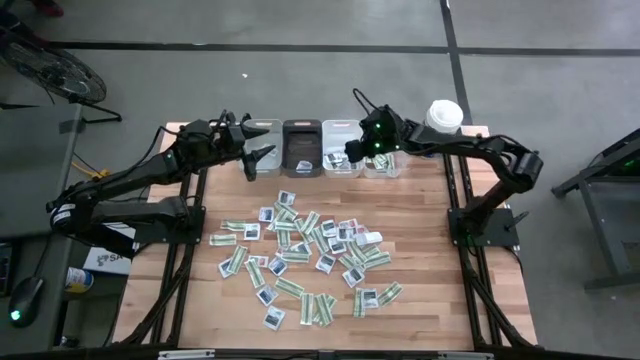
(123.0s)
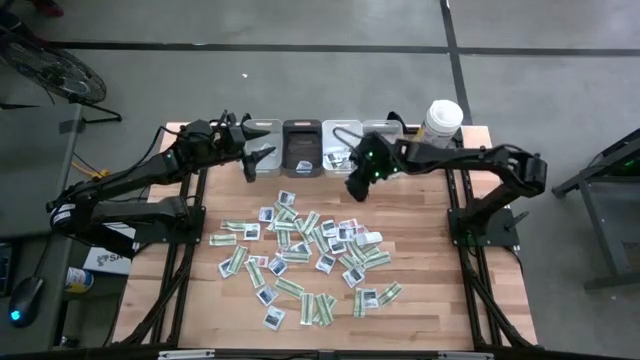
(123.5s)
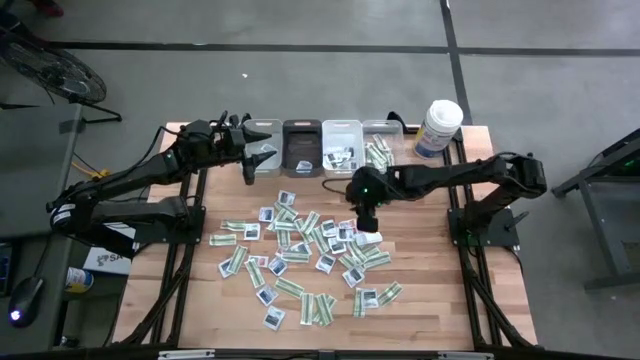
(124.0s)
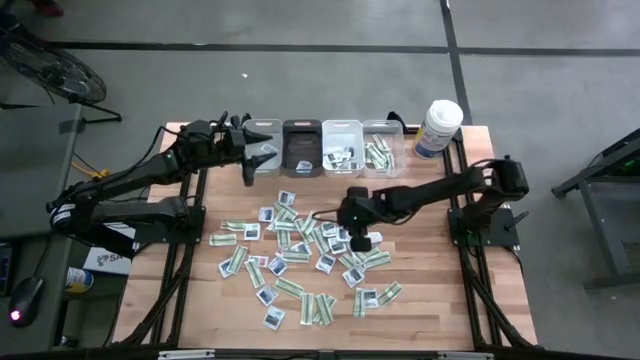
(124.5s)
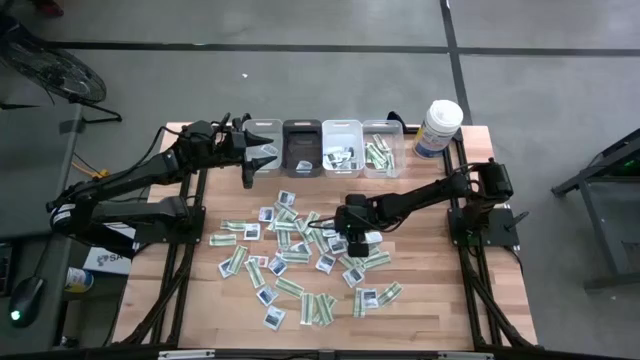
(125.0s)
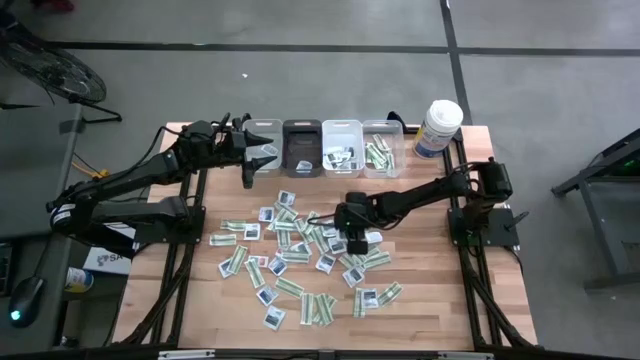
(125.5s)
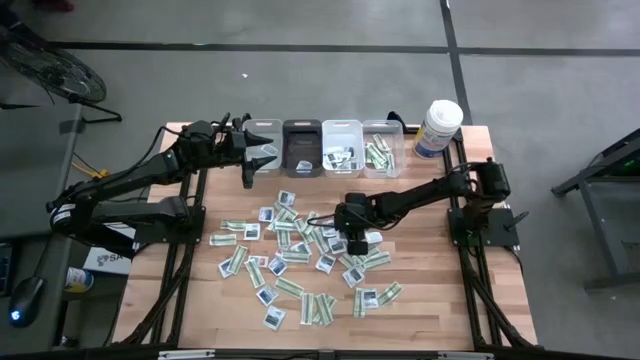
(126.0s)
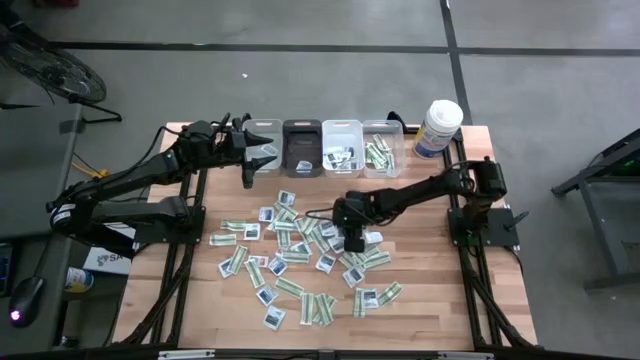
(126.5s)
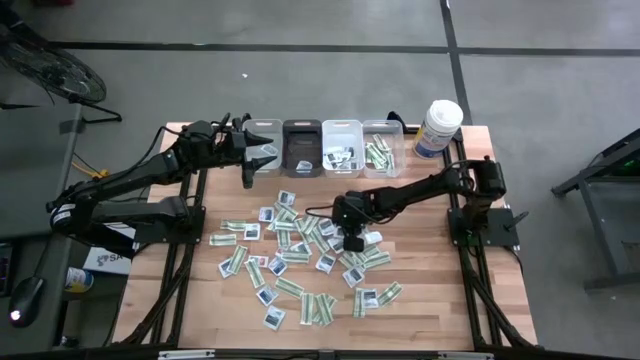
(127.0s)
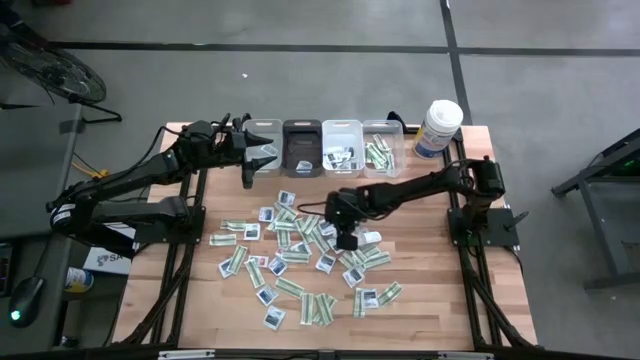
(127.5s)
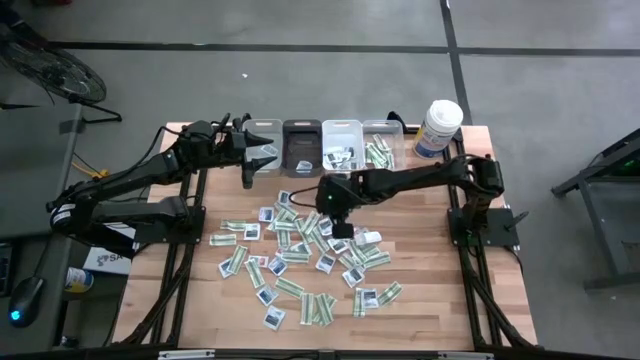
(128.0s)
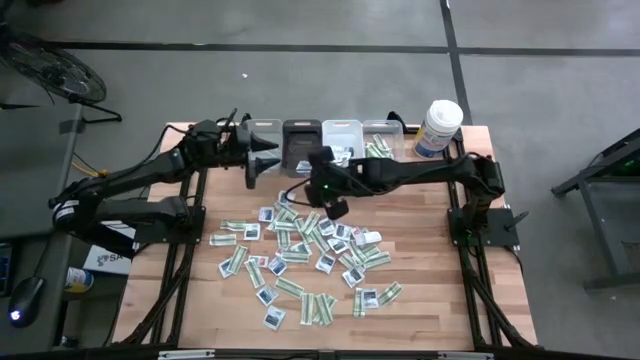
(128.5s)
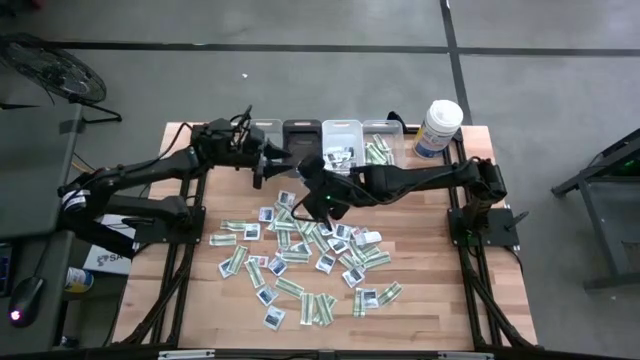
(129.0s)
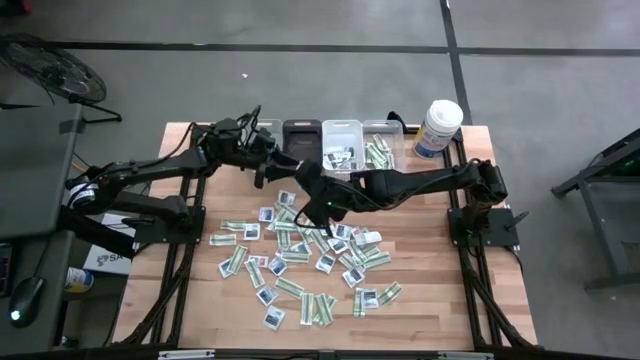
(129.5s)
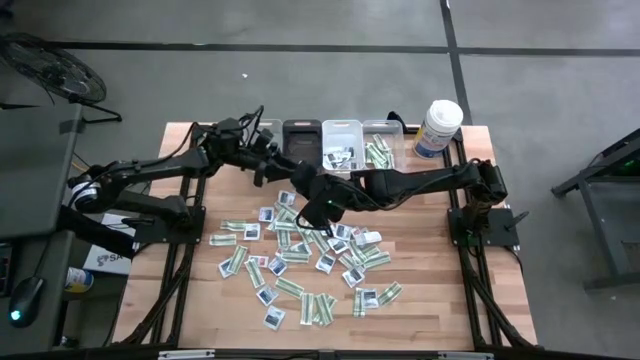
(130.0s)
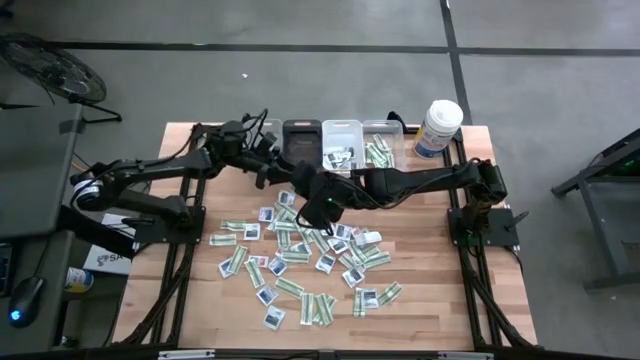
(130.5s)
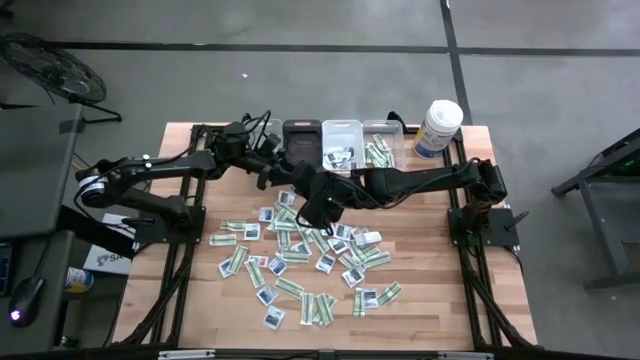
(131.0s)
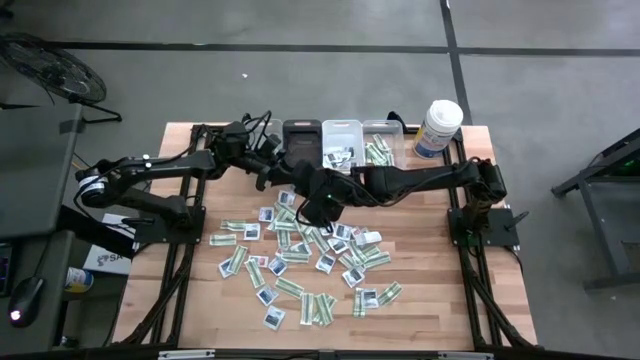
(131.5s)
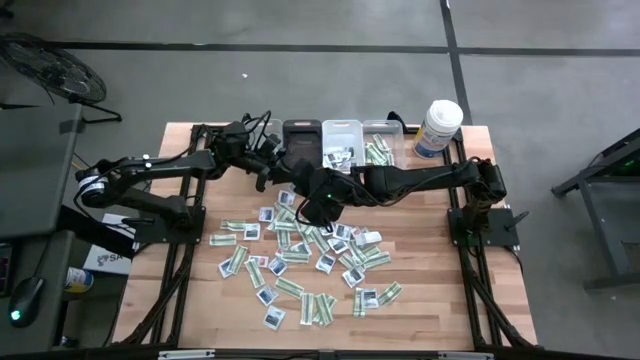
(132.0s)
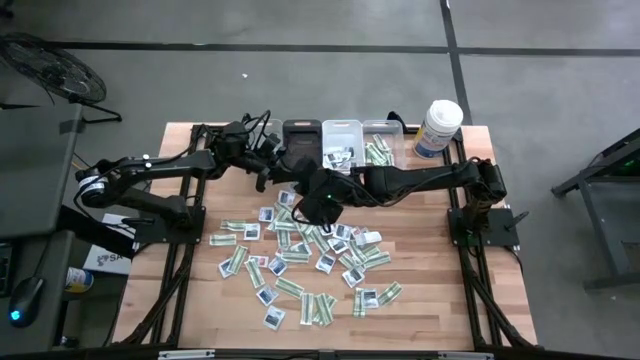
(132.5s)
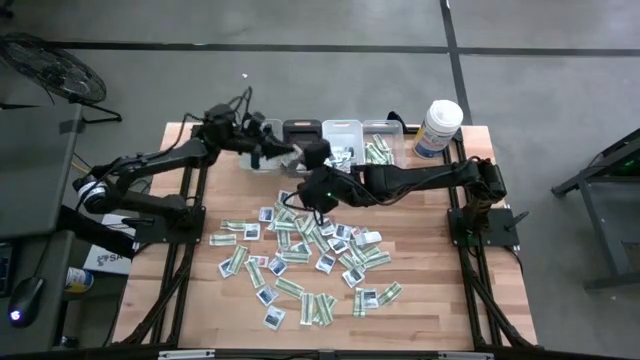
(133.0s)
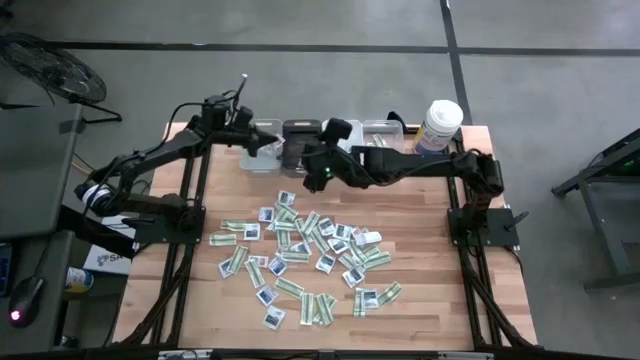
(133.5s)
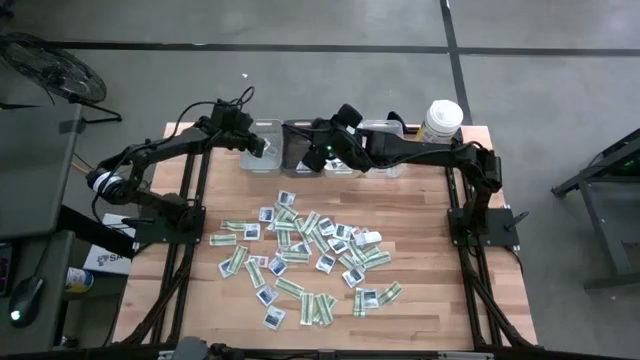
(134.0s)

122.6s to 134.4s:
Task: Pick & Place First Aid Supplies
Put the orange ointment pack into the gray bin

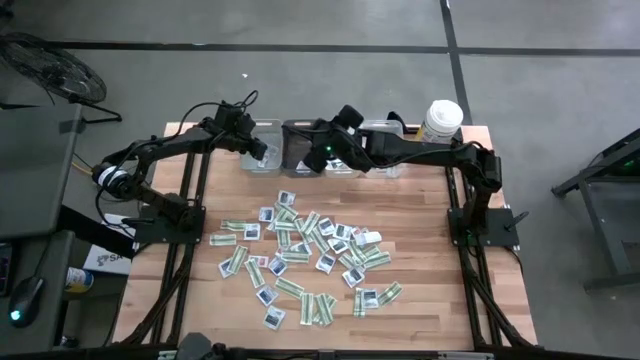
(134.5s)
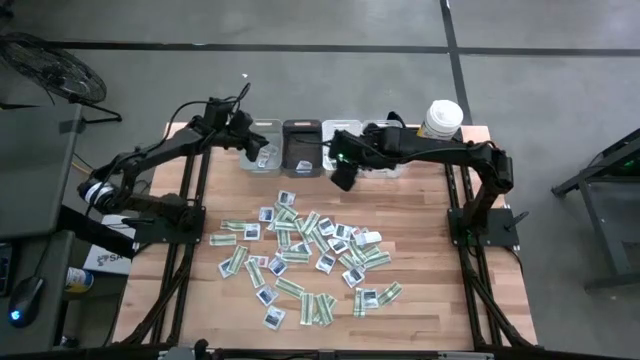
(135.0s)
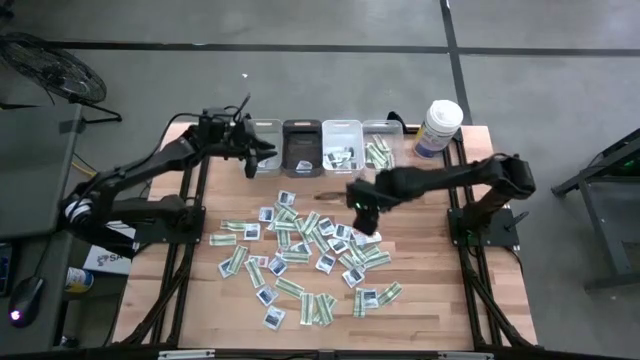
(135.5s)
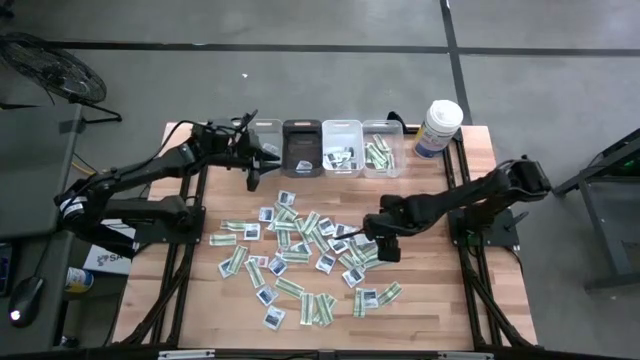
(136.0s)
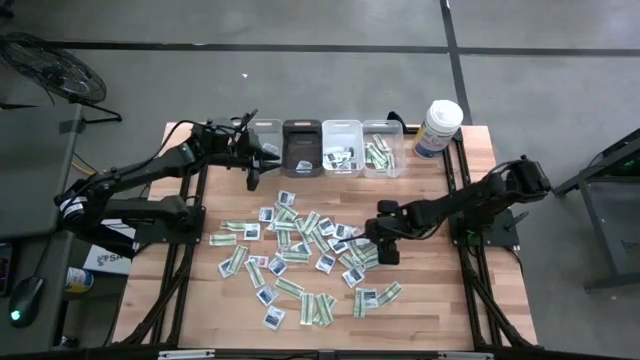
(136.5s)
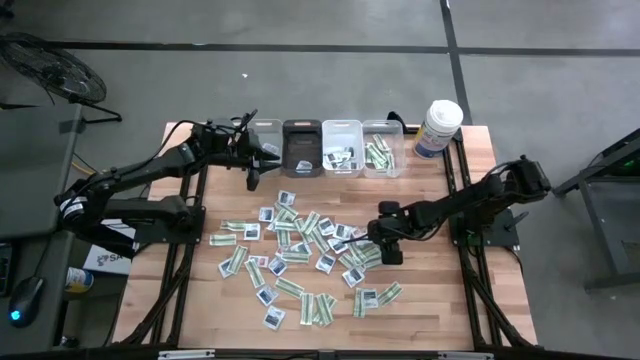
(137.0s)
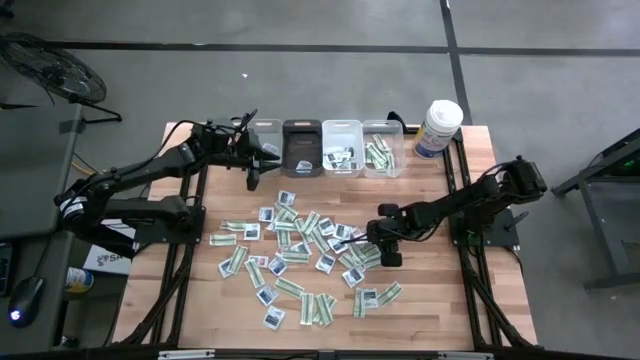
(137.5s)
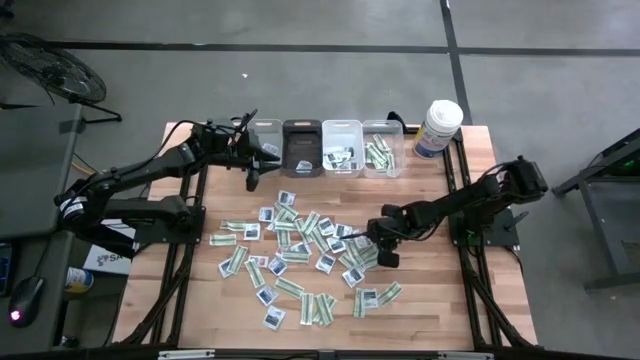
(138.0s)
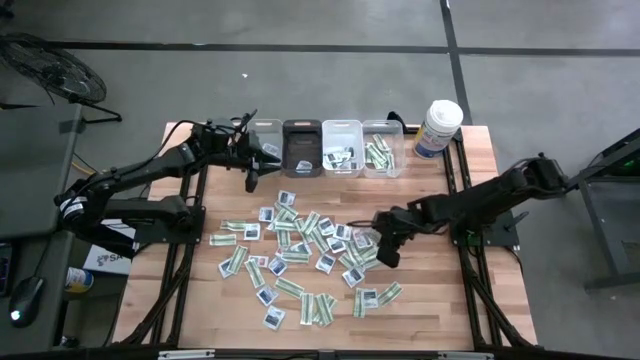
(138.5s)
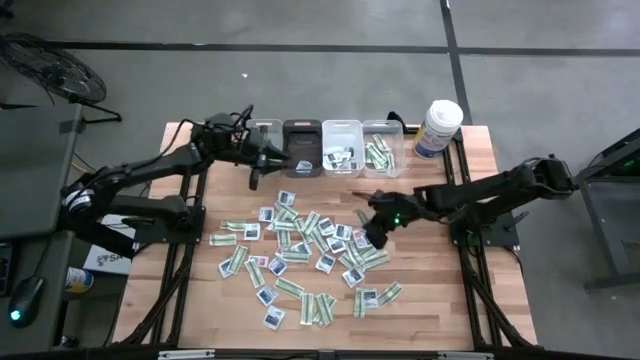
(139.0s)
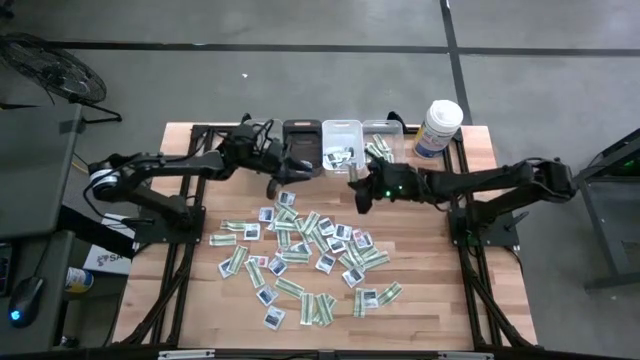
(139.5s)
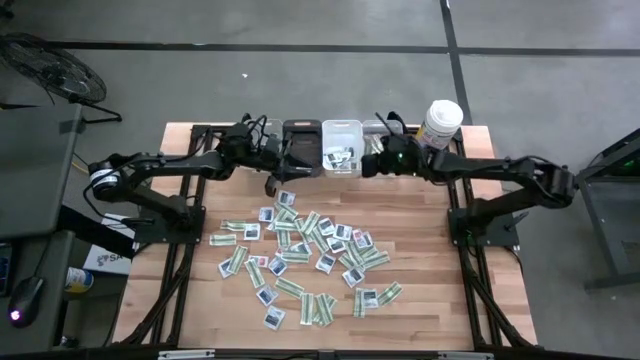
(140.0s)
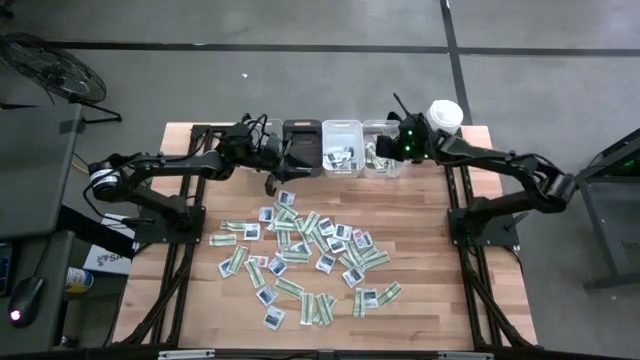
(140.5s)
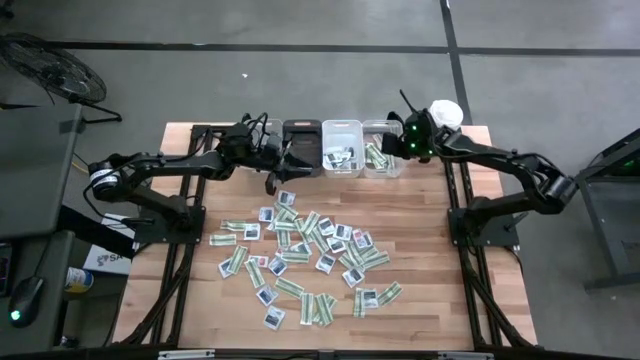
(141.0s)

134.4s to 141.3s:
Put the green bandage into the transparent bin

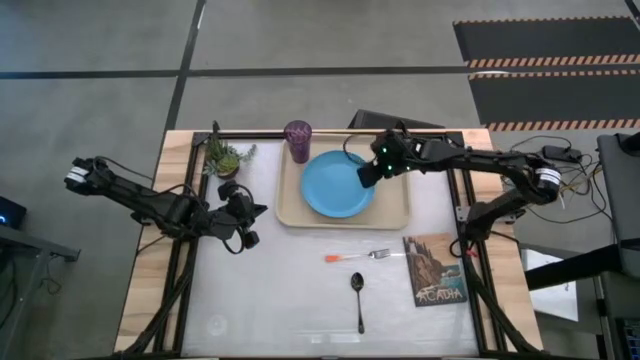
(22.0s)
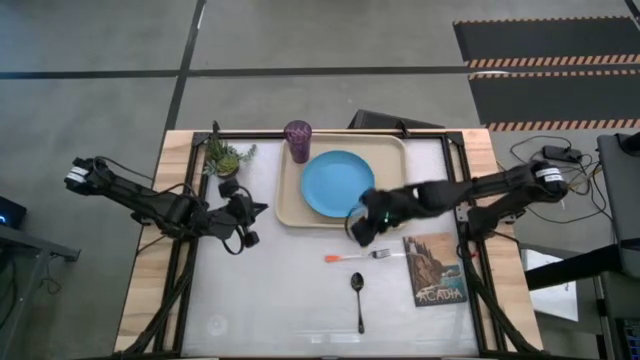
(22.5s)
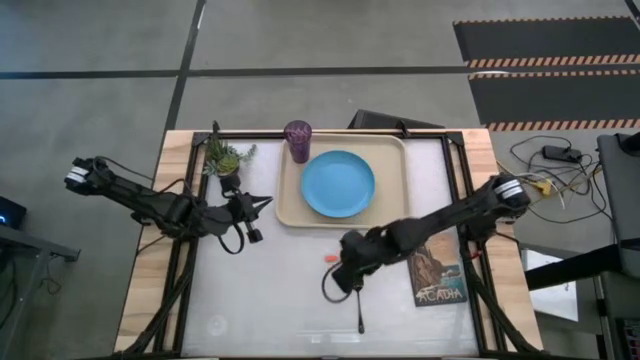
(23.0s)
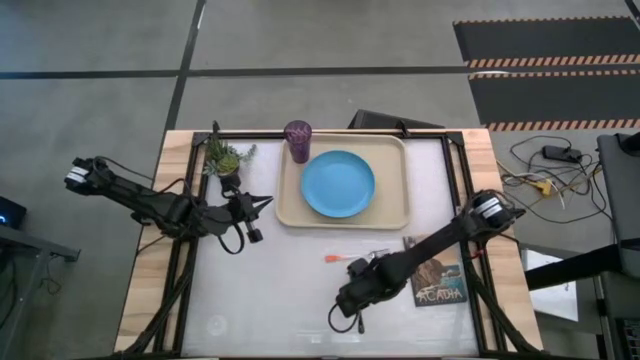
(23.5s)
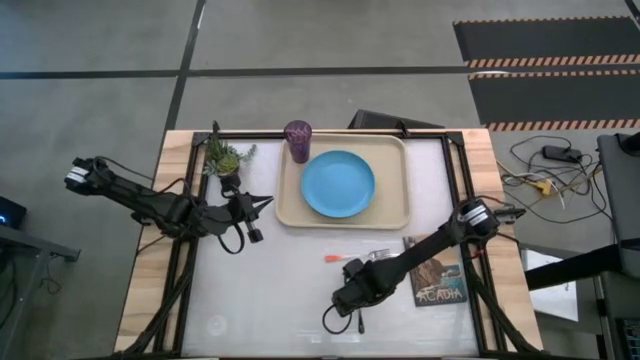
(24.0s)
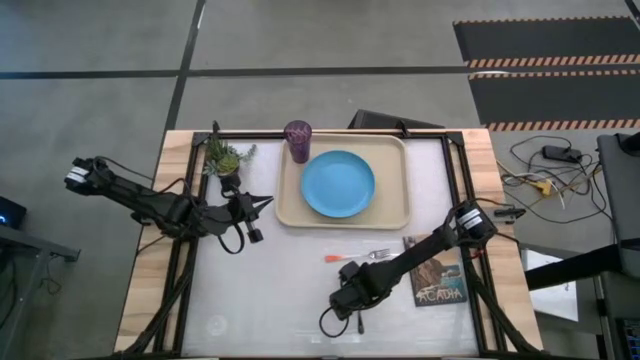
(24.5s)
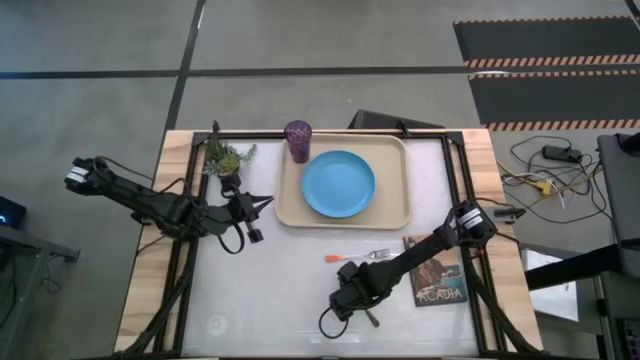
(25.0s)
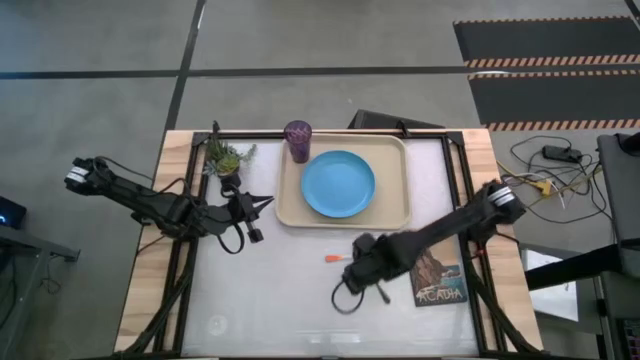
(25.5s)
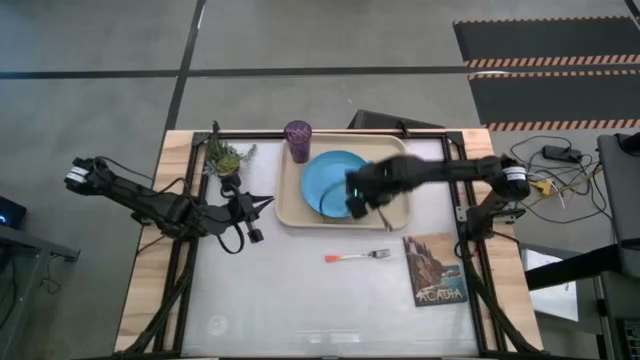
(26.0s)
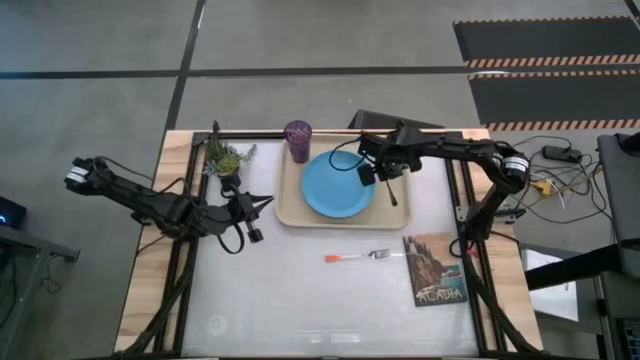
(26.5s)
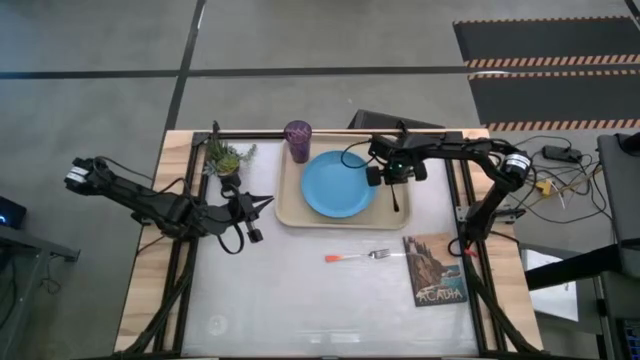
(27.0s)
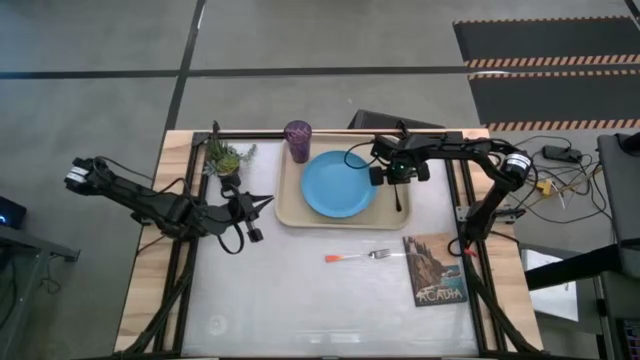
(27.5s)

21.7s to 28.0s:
Task: Pick and place plate/cup/fork/spoon on tray
Put the black spoon on the white serving tray to the left of the blue plate
